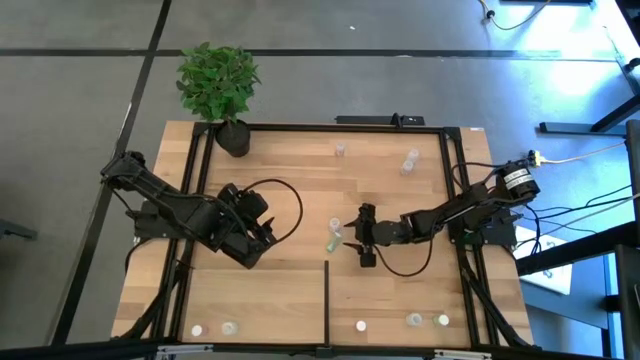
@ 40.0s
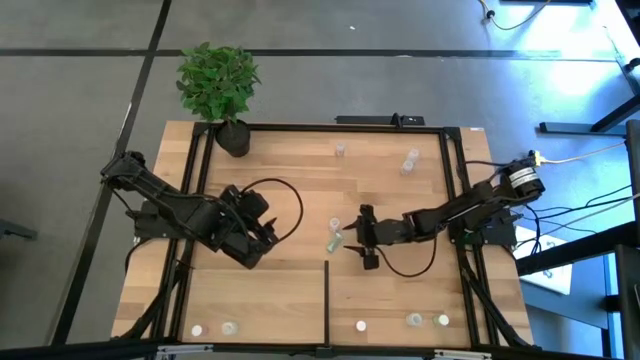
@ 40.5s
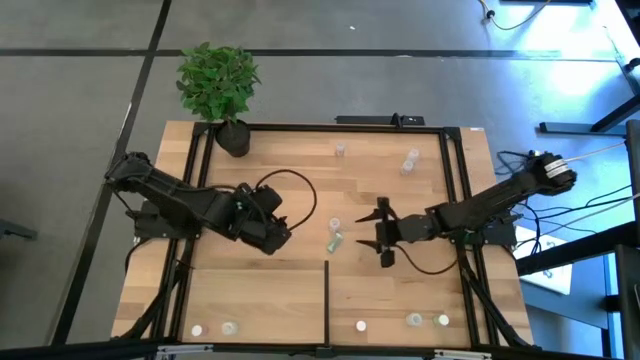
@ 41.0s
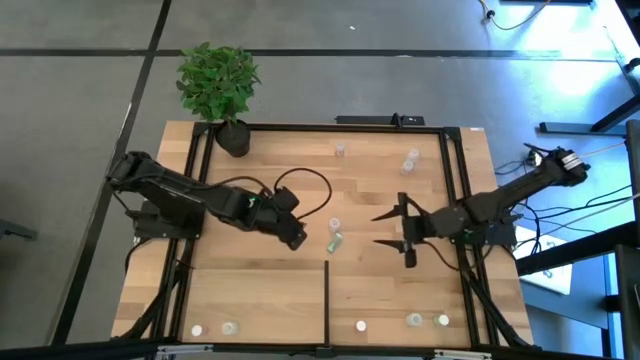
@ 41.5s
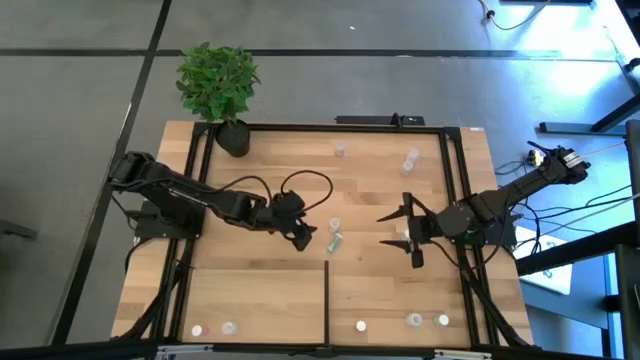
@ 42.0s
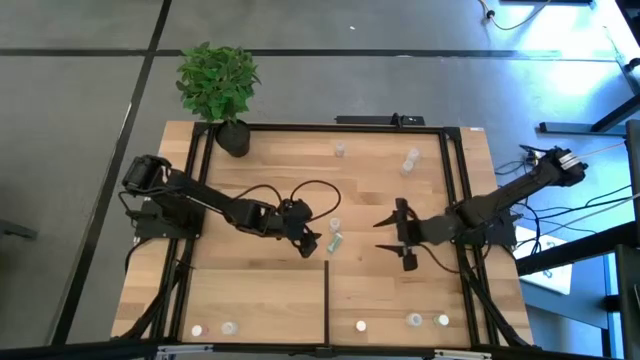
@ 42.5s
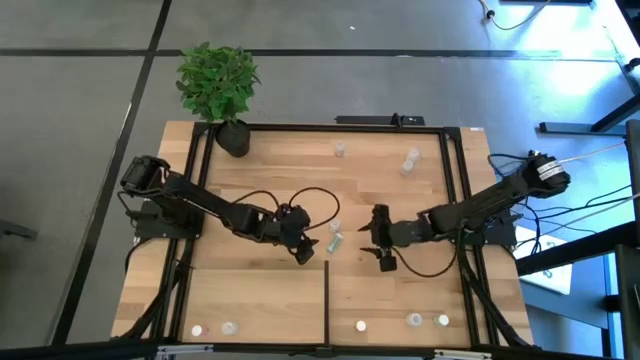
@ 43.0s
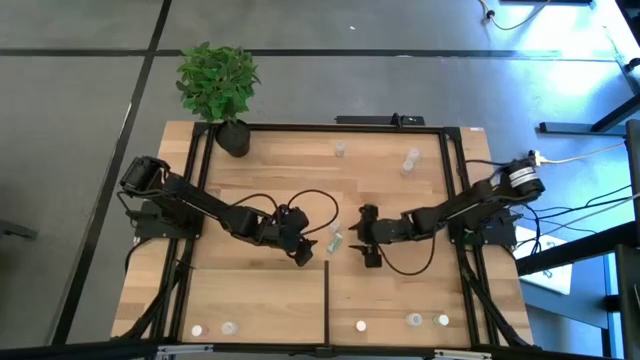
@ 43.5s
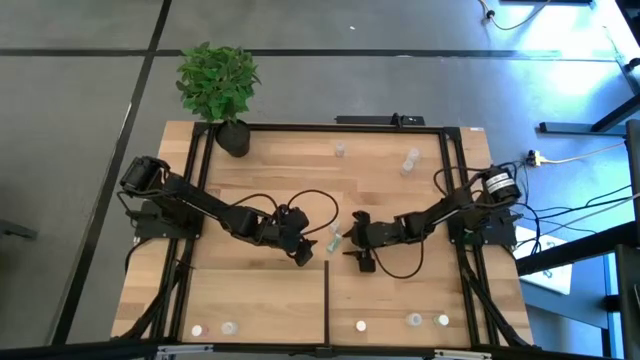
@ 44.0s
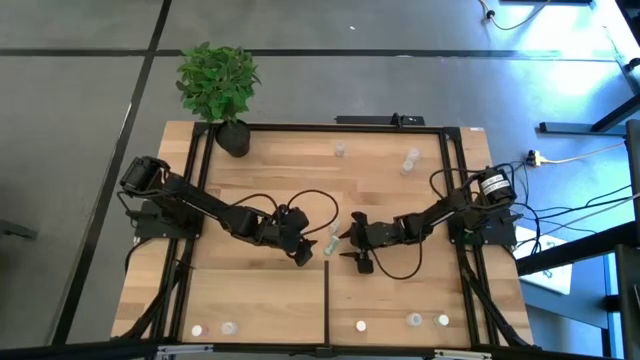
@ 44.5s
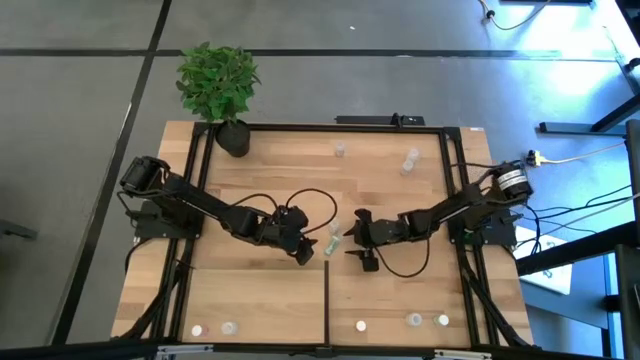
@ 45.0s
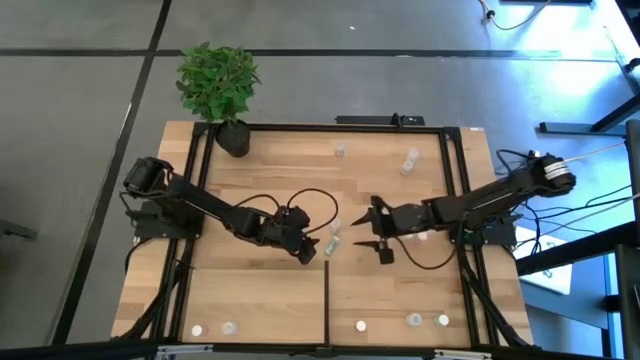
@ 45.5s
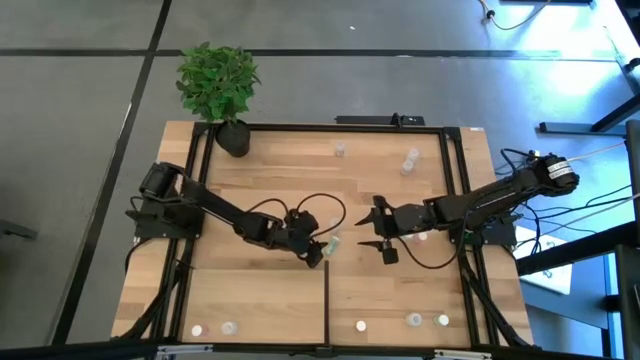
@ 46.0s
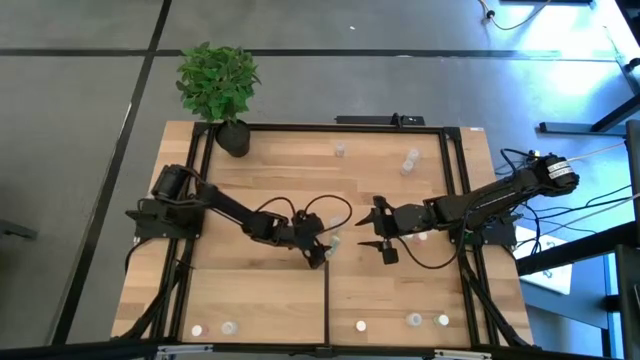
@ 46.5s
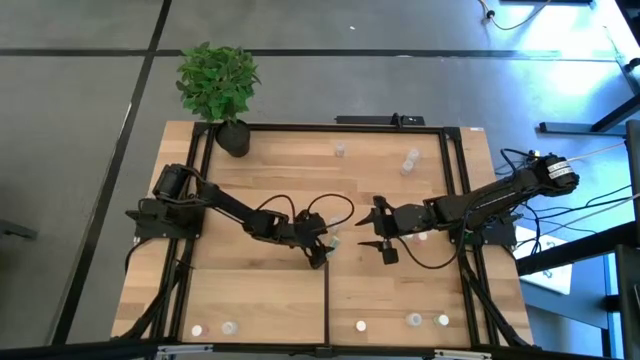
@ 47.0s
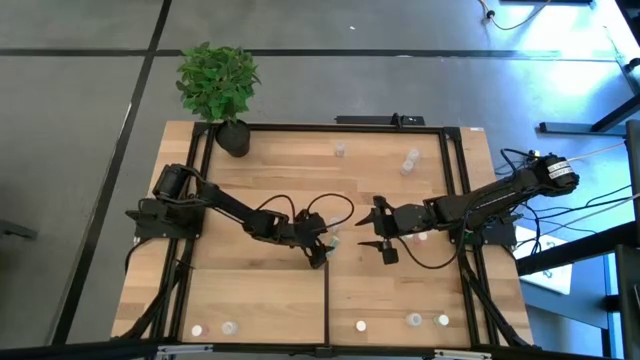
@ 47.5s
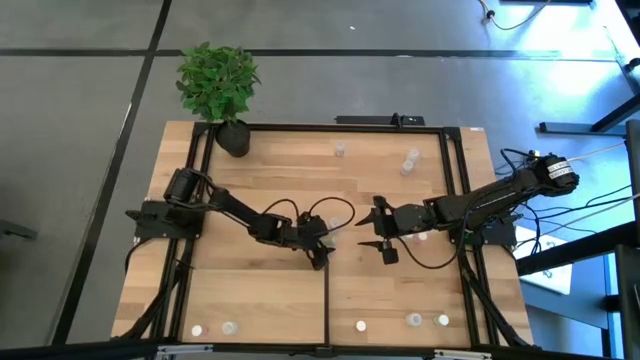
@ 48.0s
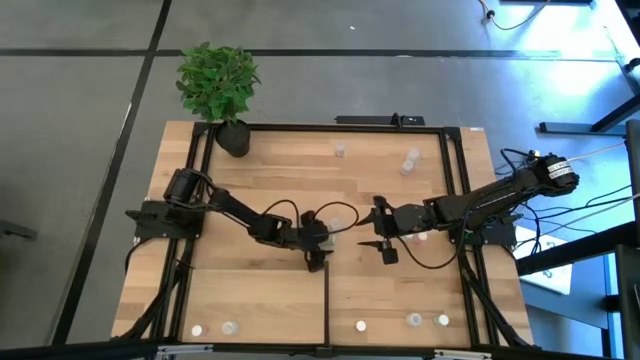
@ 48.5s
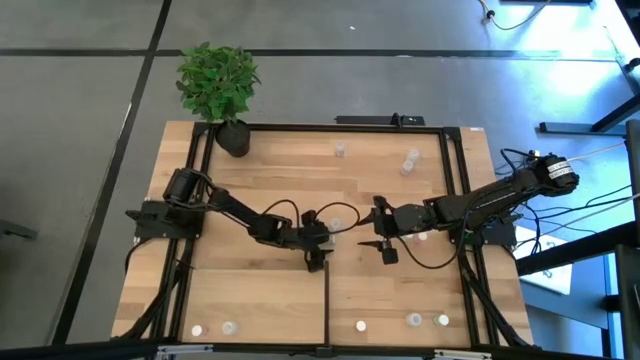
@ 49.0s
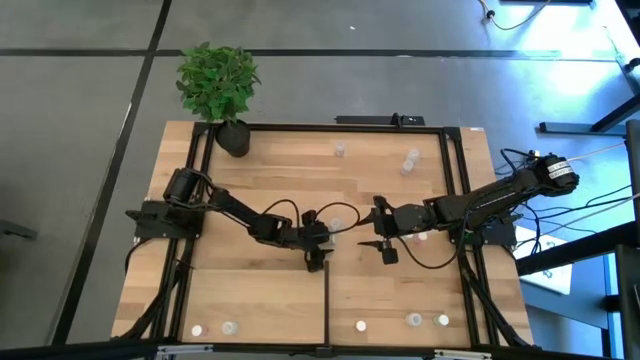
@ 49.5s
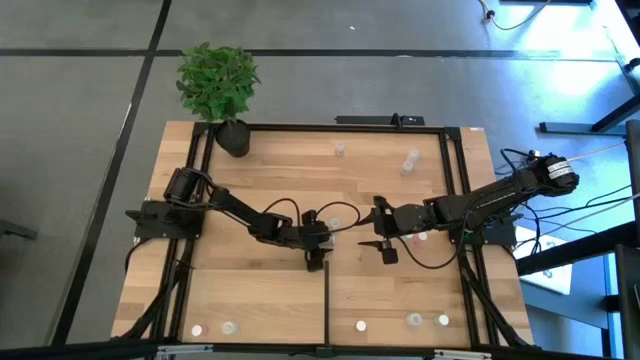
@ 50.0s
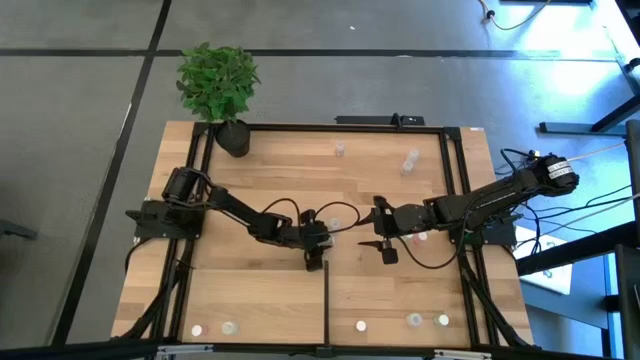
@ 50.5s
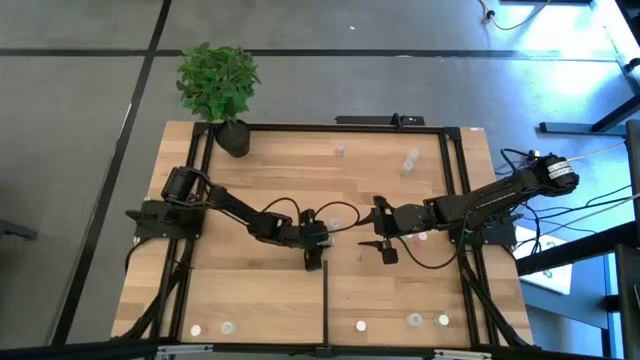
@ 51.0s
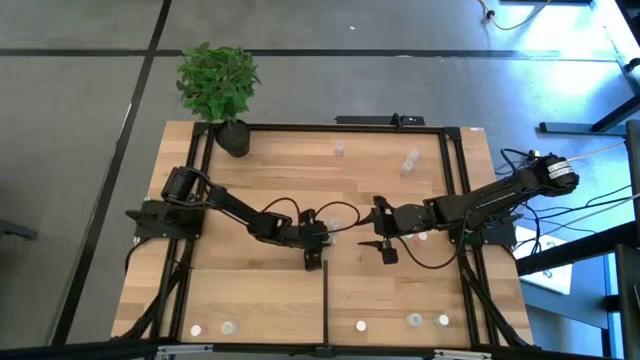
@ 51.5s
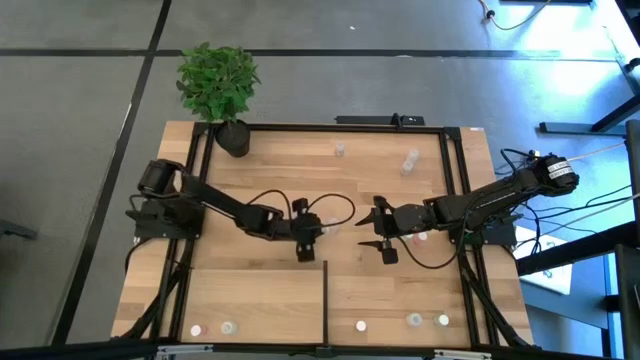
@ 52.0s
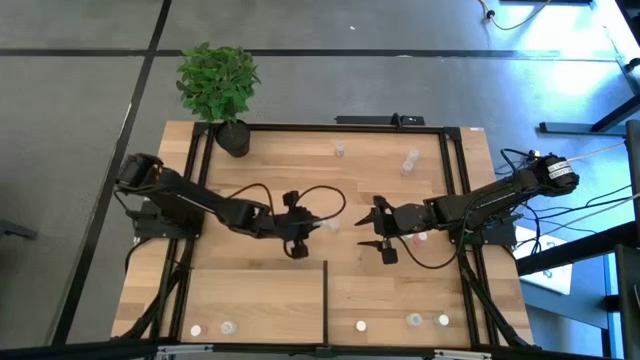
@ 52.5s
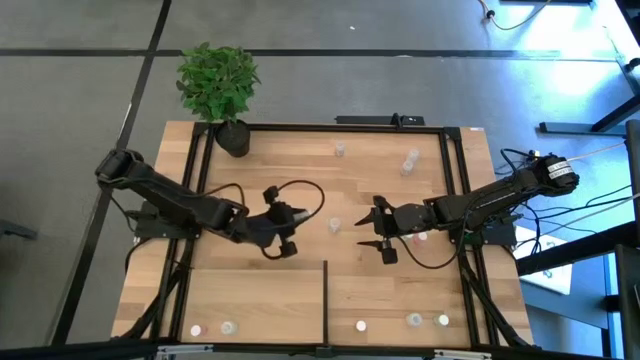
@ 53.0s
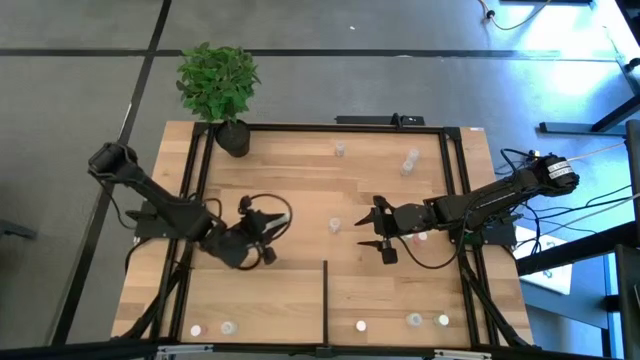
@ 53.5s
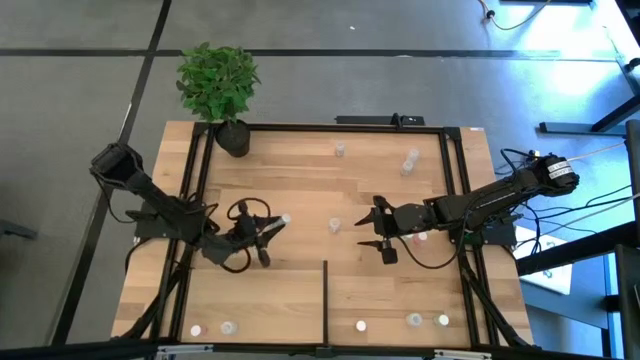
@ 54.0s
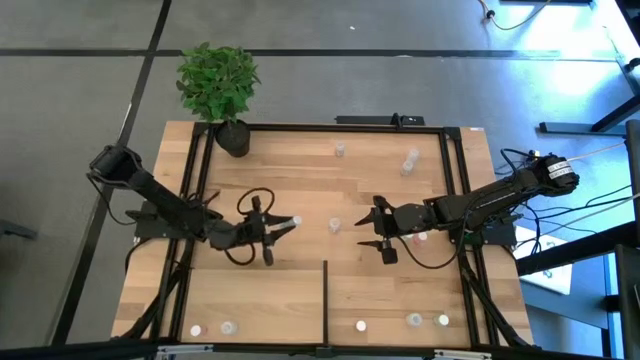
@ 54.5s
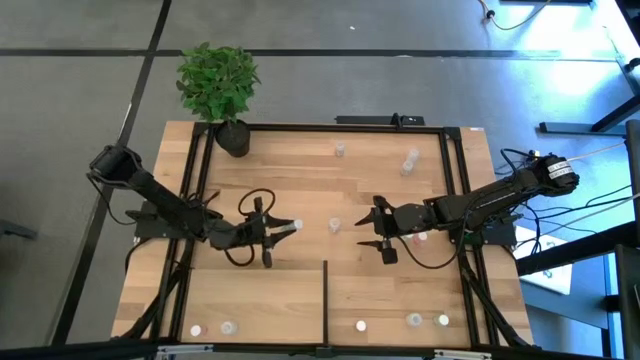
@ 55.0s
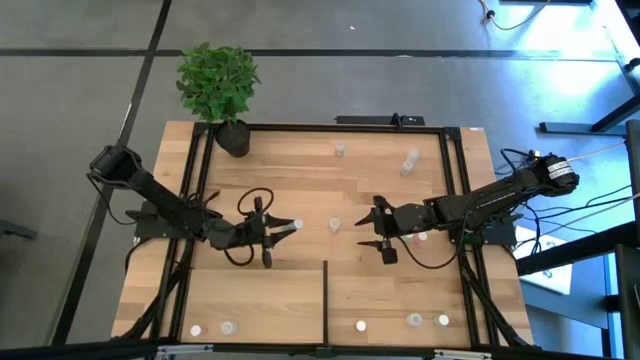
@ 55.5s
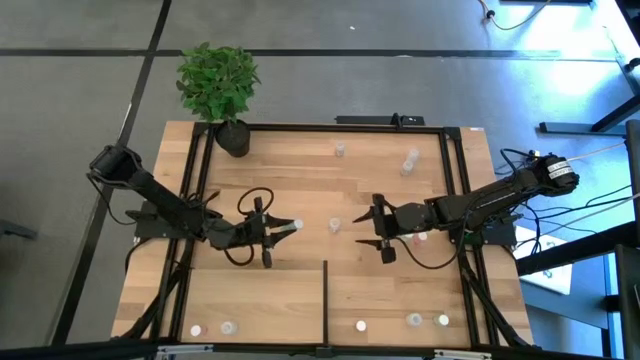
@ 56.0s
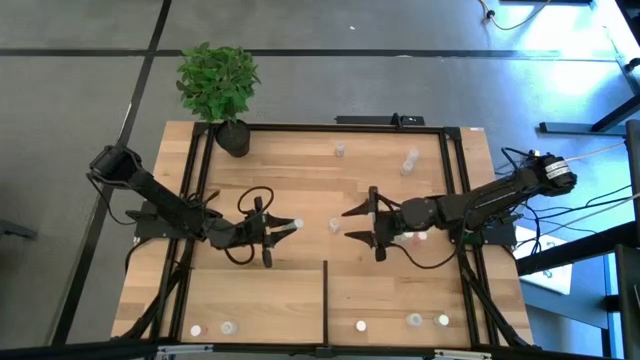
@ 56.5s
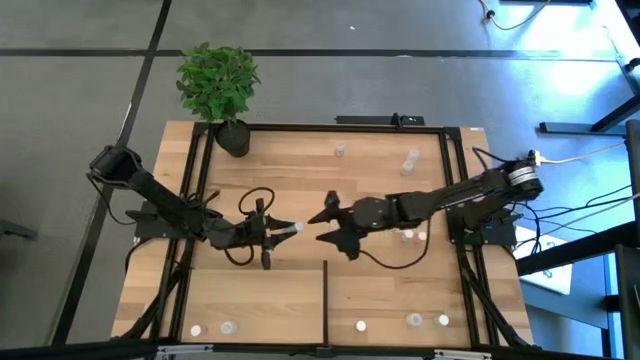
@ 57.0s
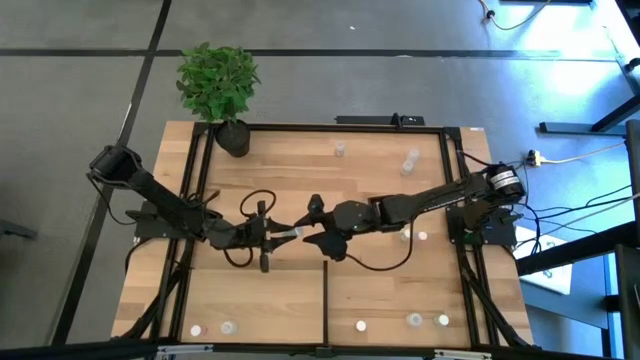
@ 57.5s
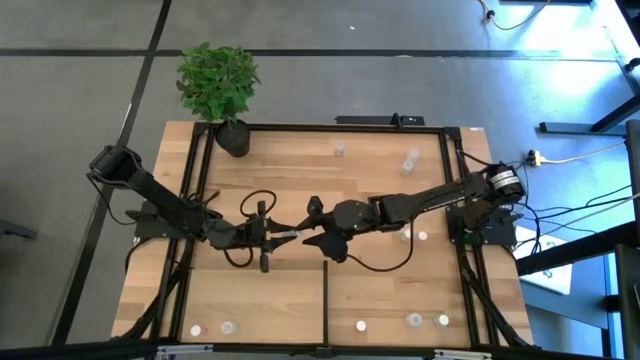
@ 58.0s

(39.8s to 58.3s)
Task: Pick and place medicine bottles onto shelf by color
Put the top left green pill bottle on the shelf

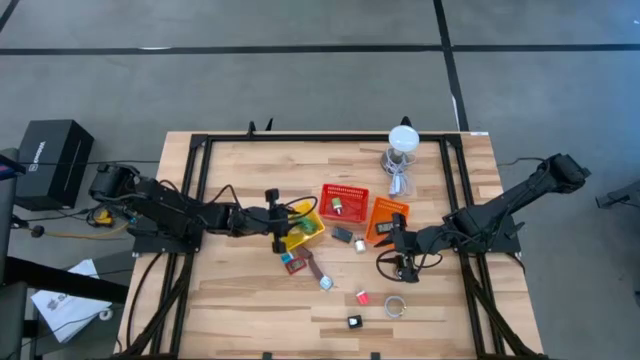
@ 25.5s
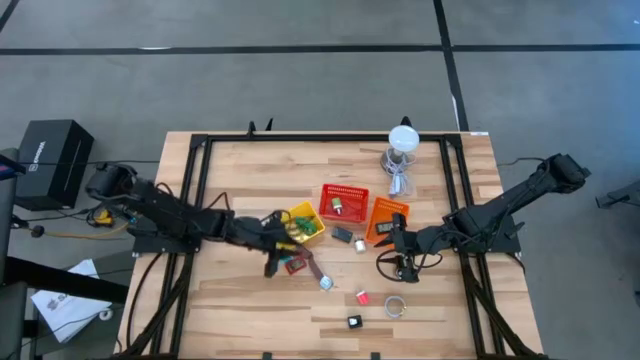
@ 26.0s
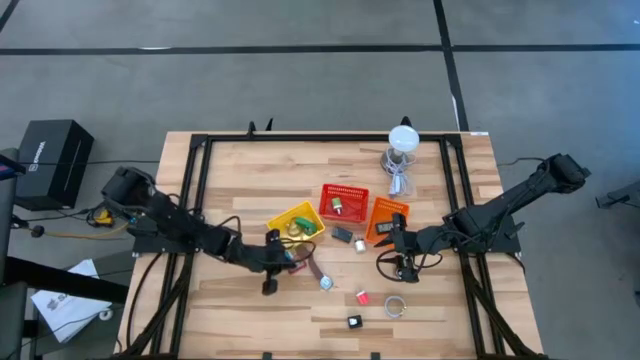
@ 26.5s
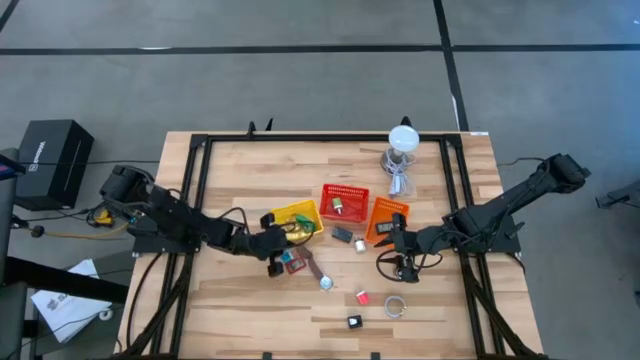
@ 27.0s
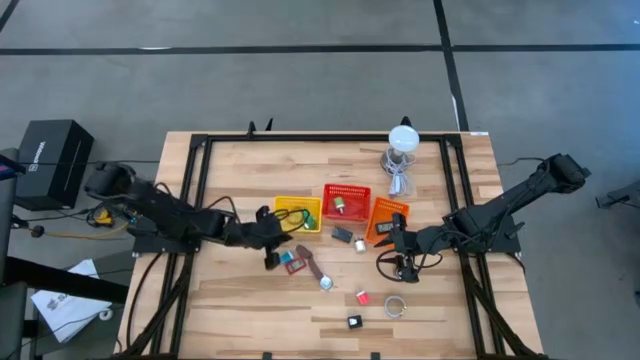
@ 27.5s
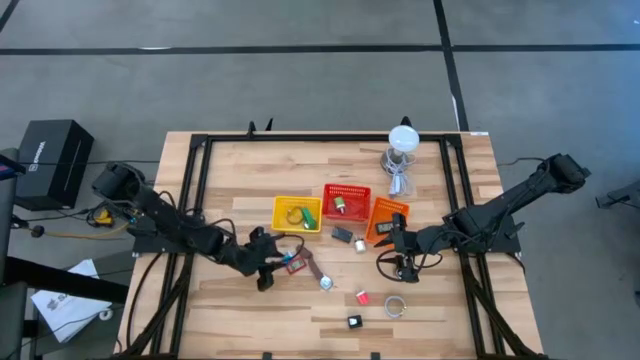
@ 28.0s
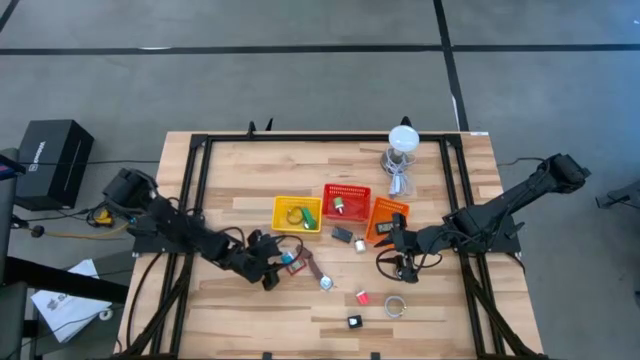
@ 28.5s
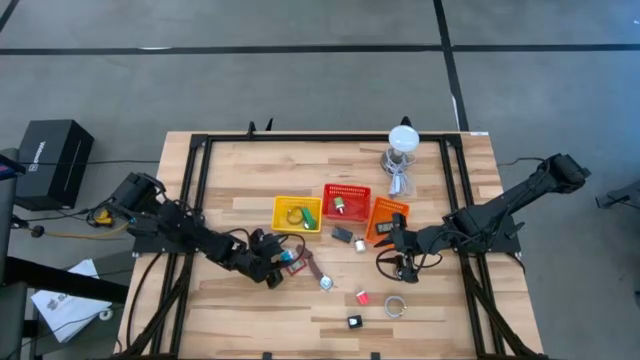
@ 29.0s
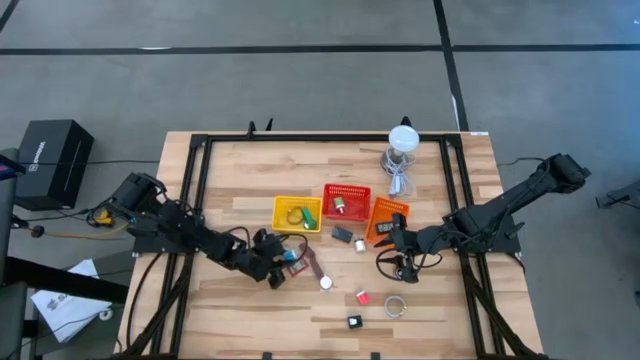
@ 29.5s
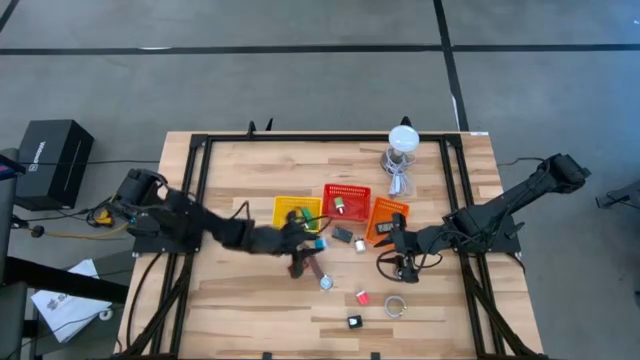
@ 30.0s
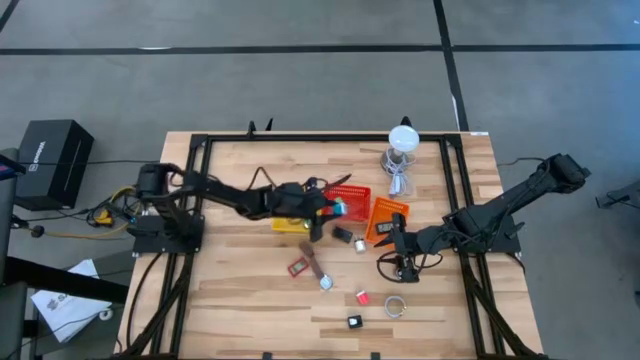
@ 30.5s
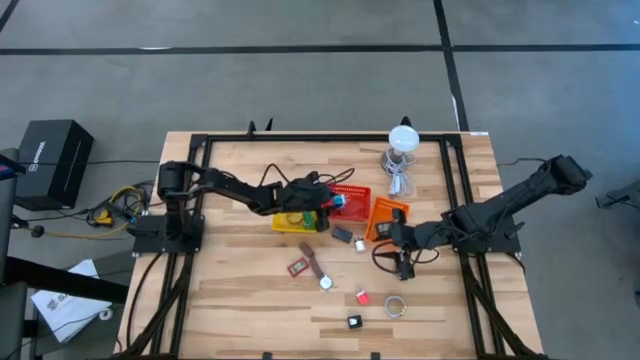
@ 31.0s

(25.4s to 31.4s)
Task: Pick & Place Office items
Put the blue charger adapter into the red bin
